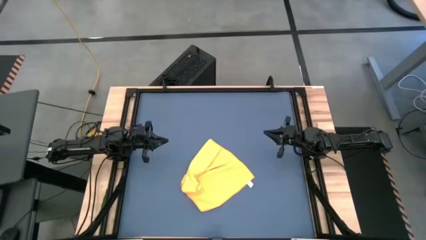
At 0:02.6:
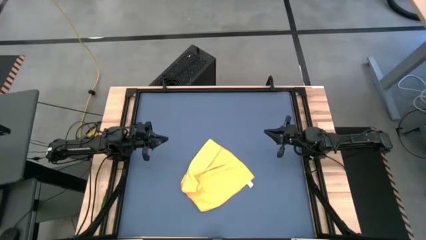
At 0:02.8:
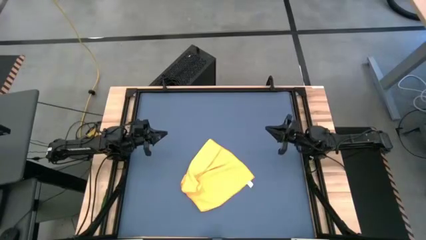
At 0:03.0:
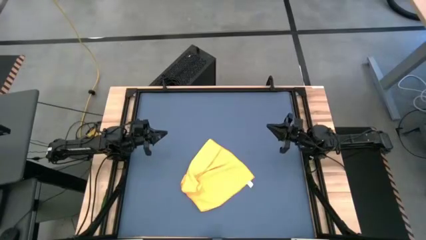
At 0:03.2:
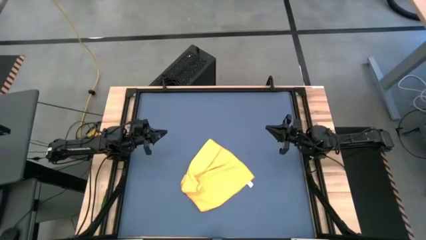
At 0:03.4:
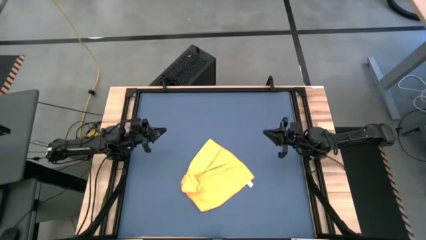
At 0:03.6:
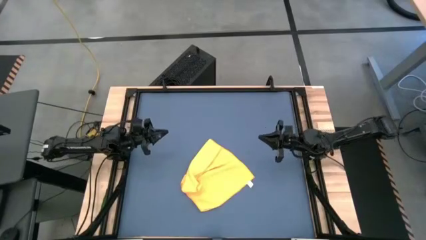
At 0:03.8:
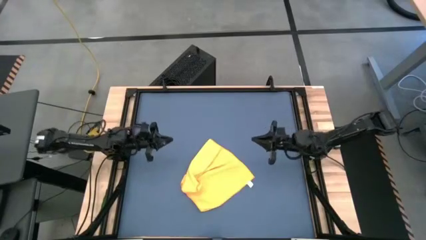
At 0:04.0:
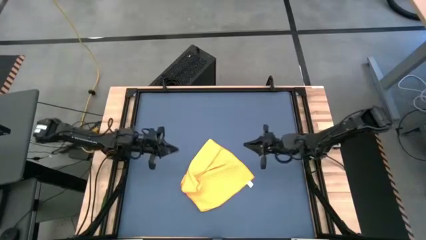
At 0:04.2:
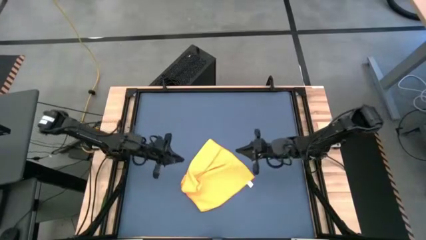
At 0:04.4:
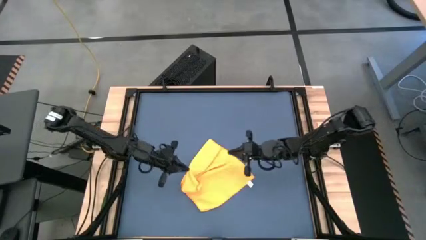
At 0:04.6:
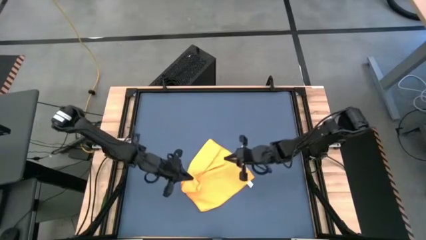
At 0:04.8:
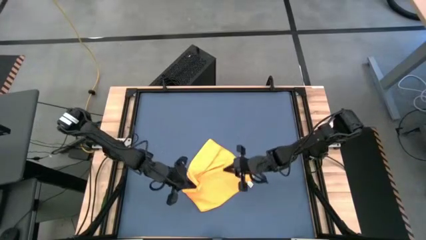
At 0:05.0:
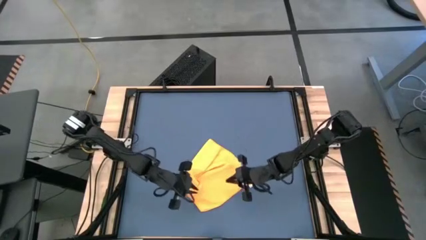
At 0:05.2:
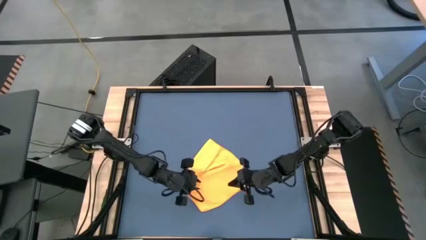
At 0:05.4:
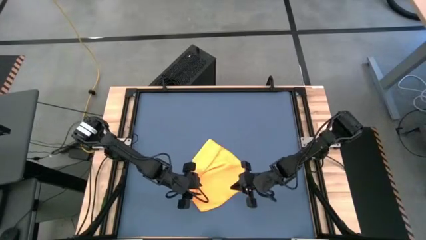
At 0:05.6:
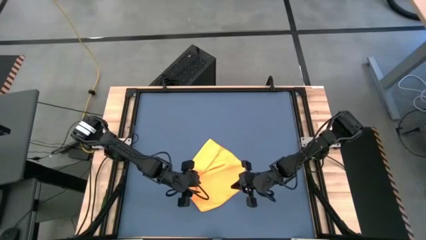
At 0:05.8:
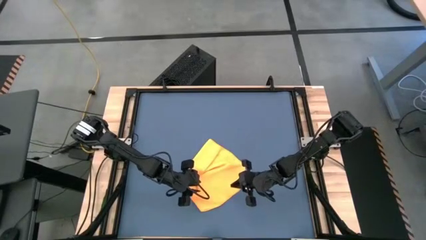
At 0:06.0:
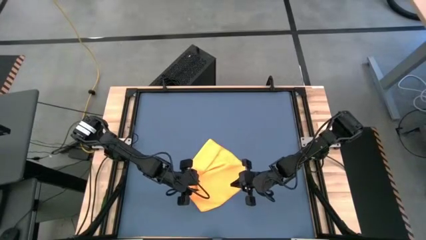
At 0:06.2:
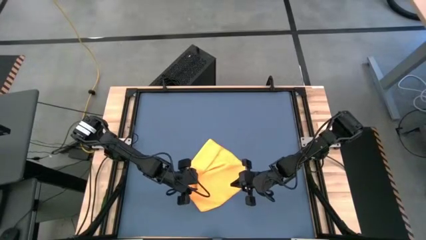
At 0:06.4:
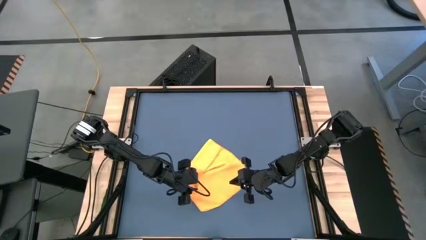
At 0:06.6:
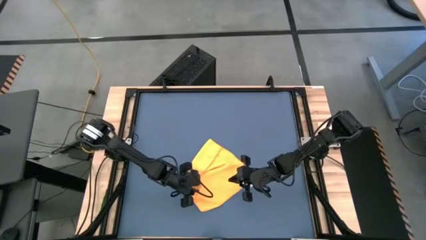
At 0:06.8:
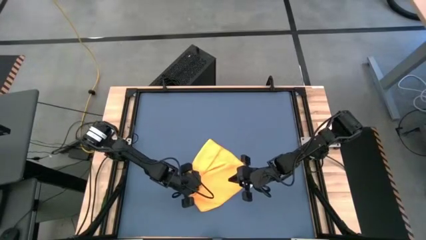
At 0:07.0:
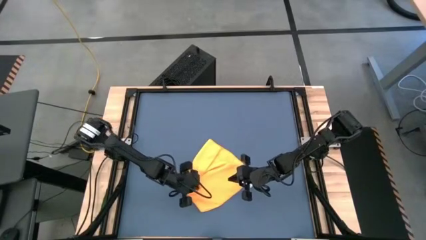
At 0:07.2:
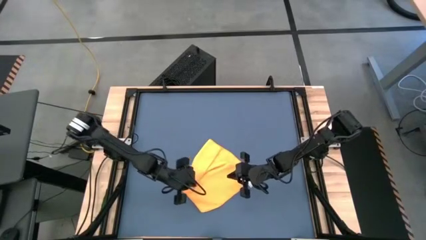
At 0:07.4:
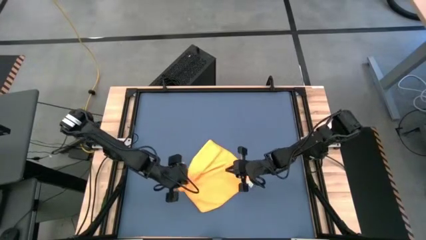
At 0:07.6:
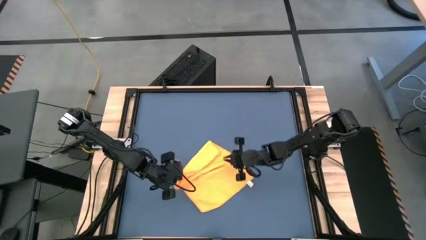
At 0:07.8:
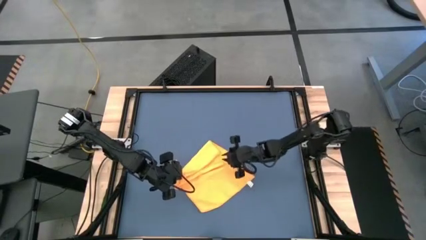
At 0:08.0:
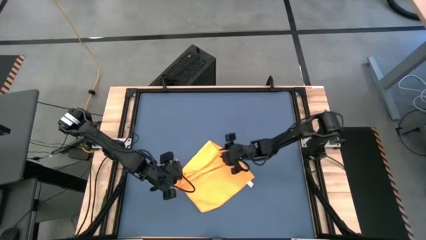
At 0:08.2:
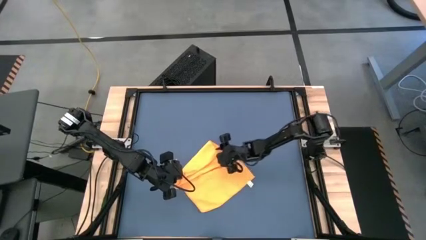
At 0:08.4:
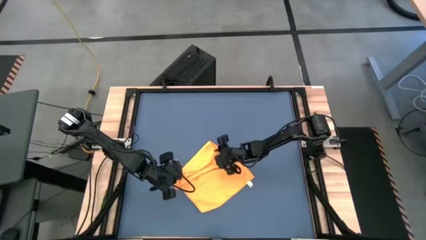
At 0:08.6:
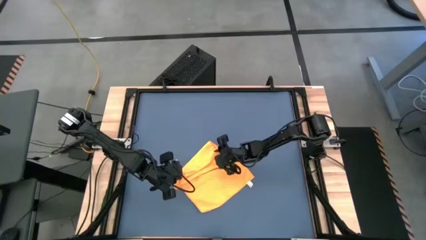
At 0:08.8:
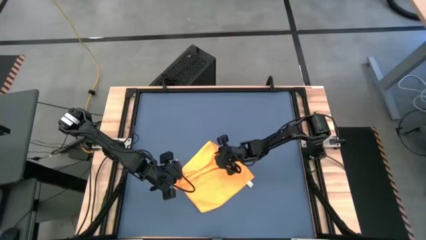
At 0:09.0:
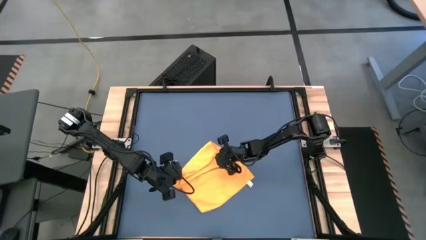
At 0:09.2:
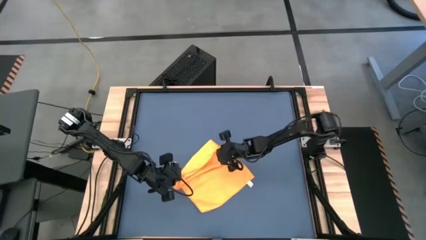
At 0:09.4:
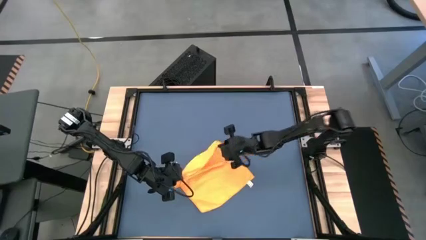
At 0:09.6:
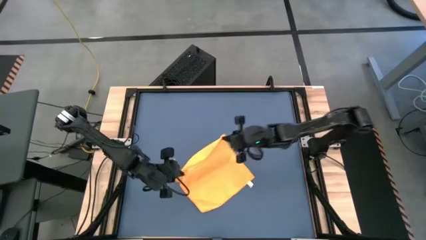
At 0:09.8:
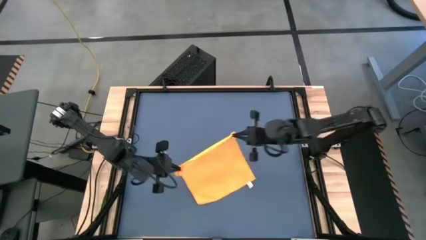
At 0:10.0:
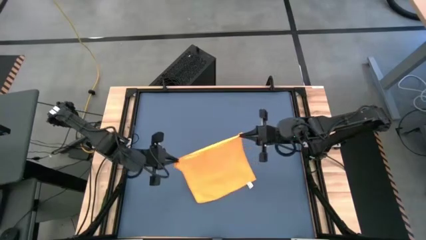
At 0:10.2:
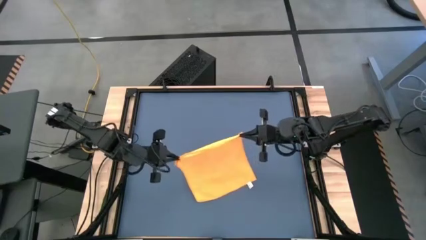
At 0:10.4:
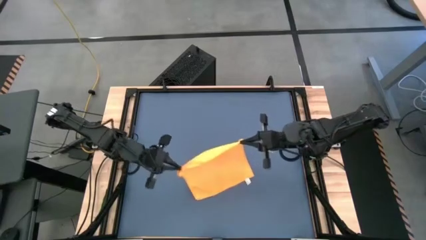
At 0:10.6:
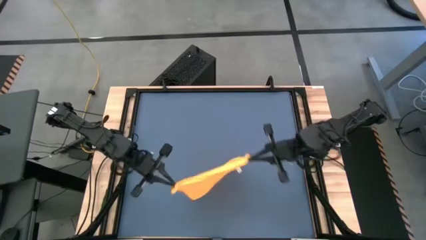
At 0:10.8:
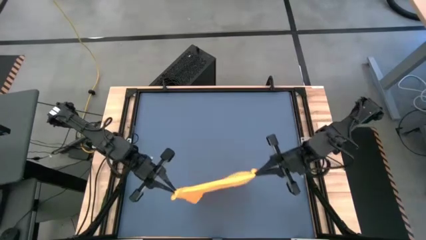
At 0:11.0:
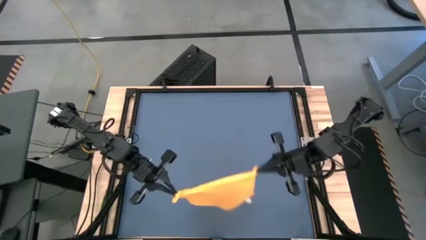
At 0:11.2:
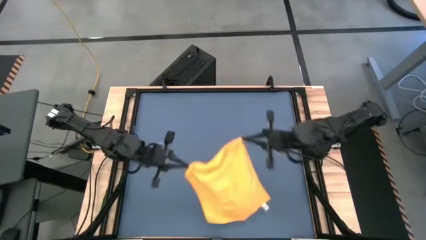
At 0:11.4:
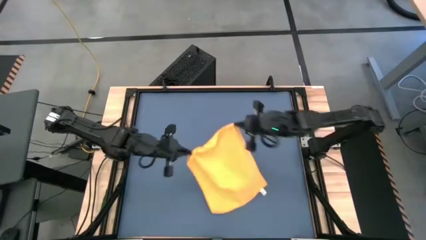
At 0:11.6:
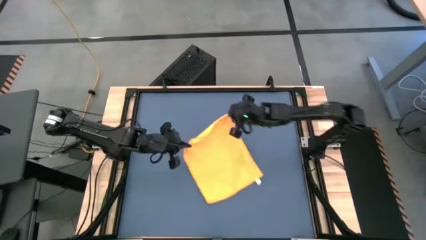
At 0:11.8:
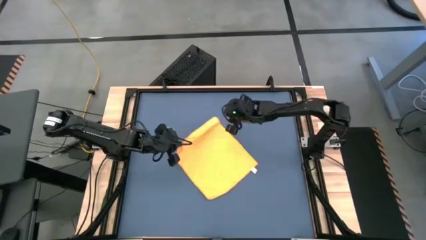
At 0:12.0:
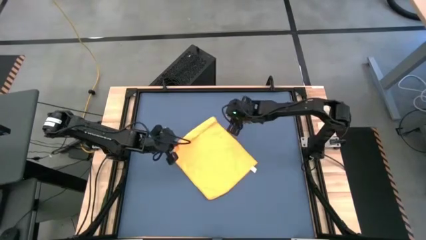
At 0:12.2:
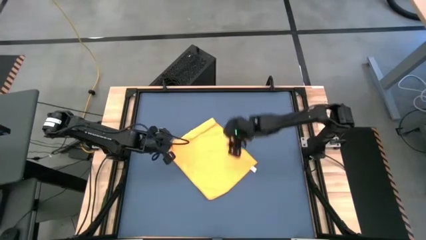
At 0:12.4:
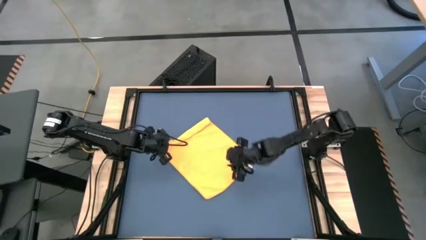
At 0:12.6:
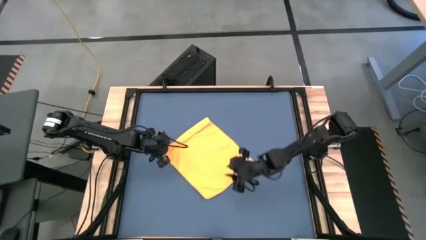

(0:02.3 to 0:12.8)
Task: Roll towel
Fold the orange microfiber towel
